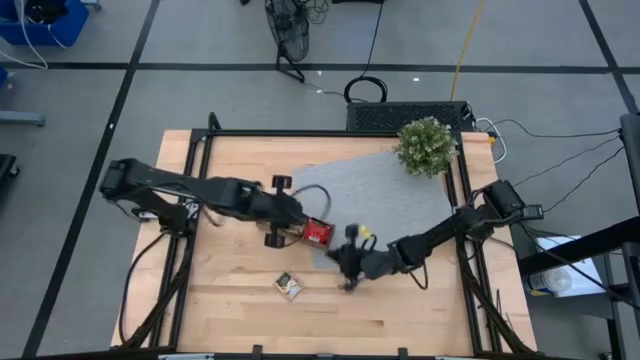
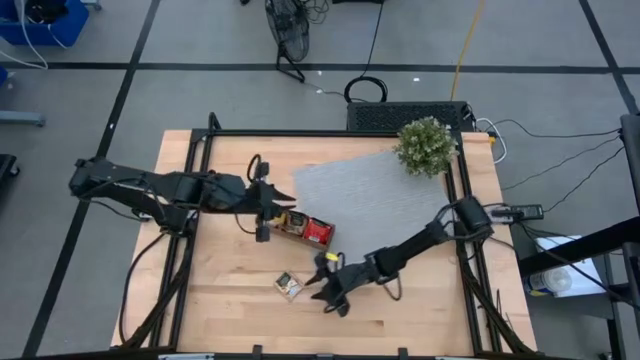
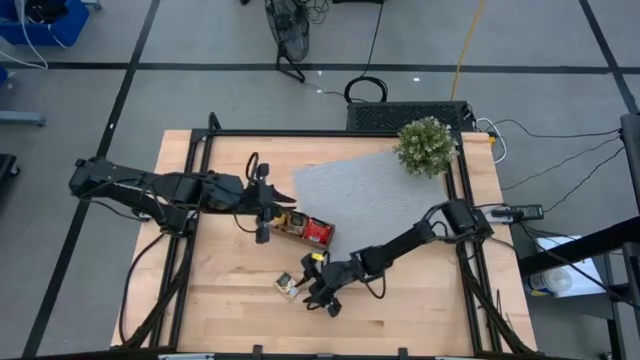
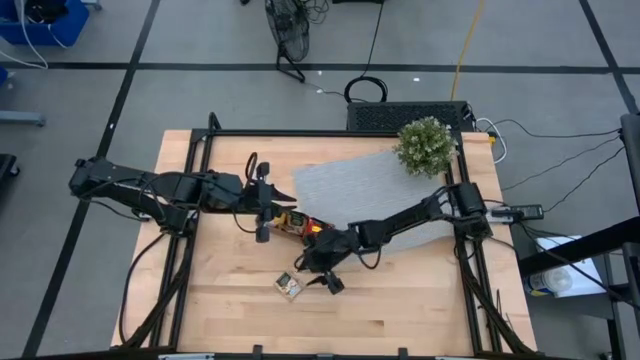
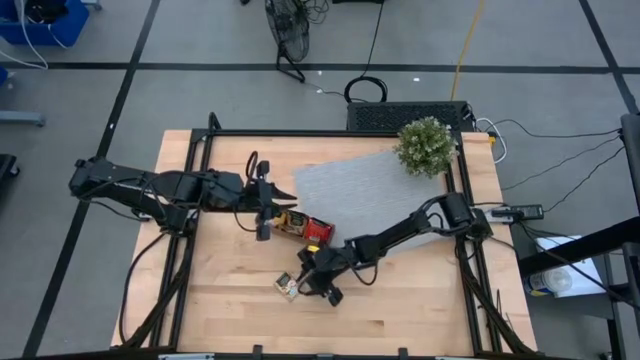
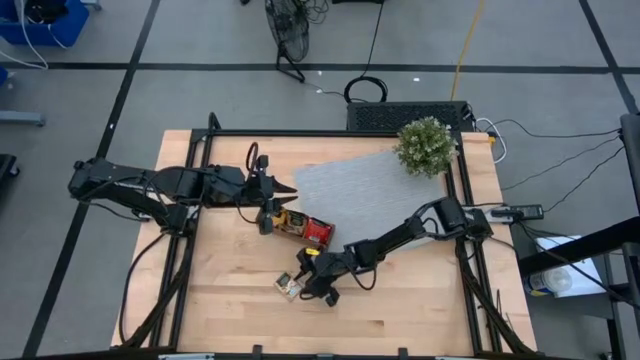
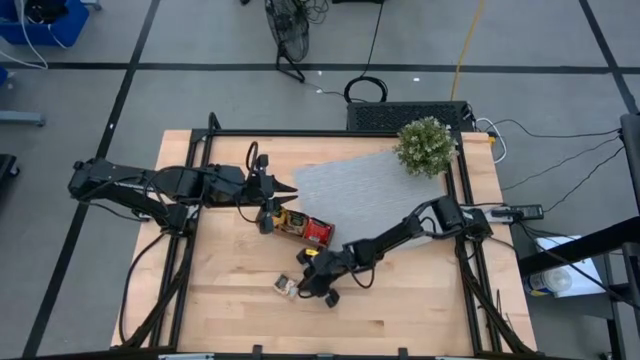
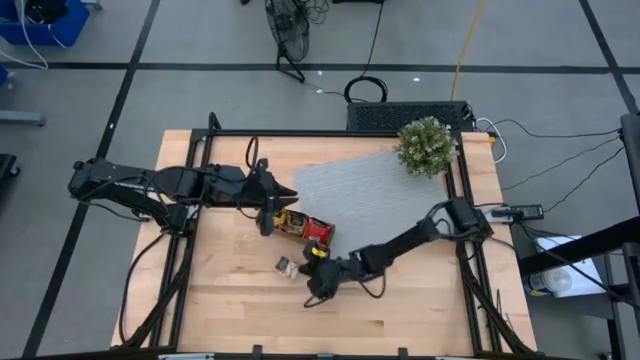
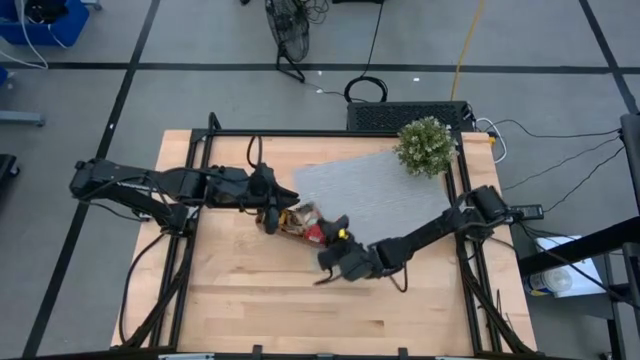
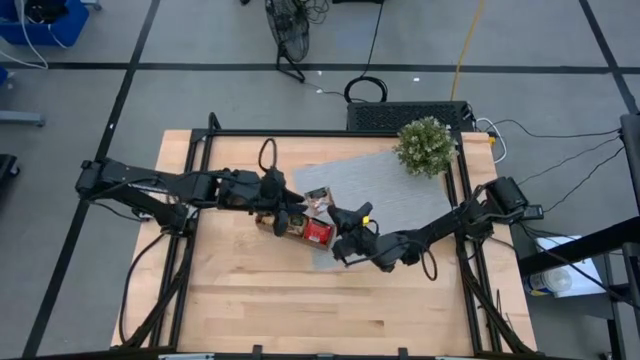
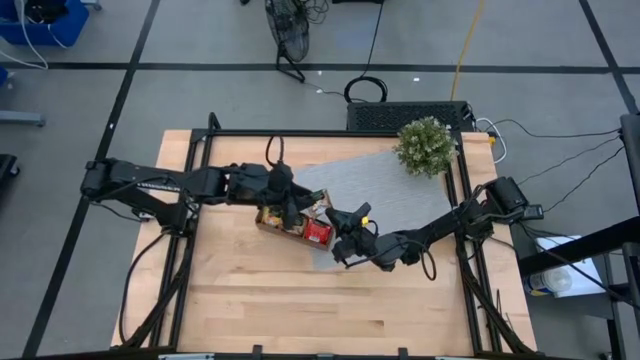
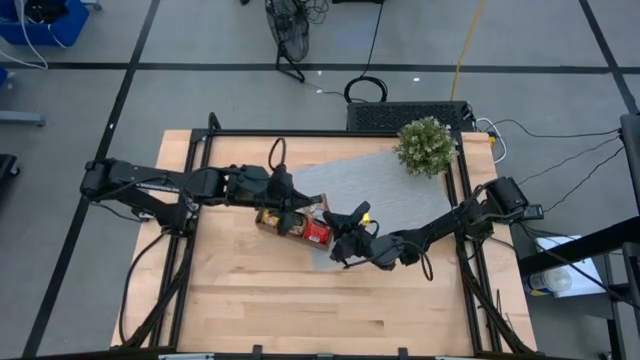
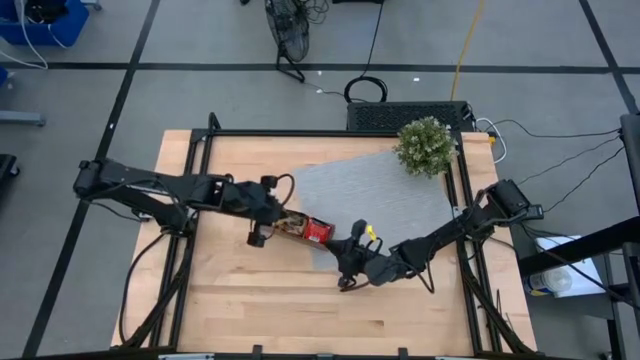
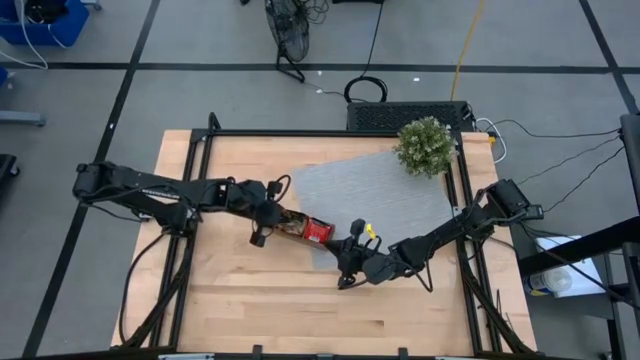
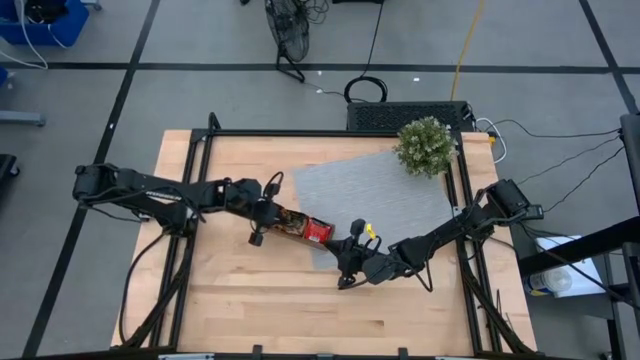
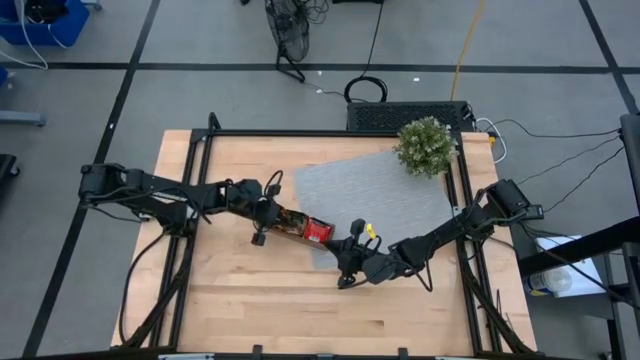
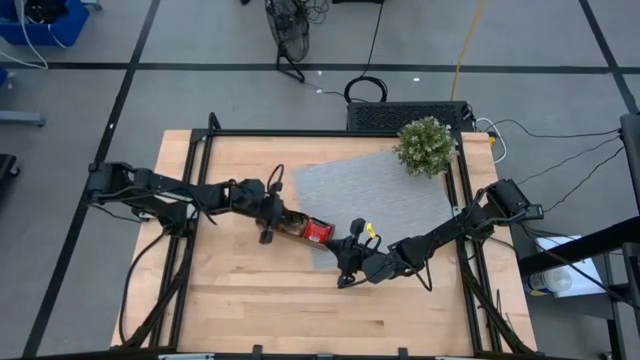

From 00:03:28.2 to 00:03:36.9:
Task: Pick & Place Tea
Put the brown tea bag into the middle section of the wooden organizer

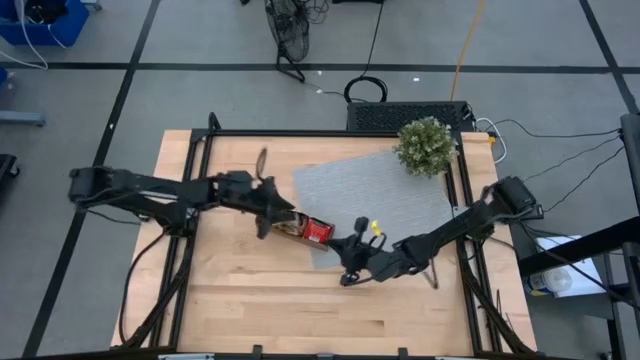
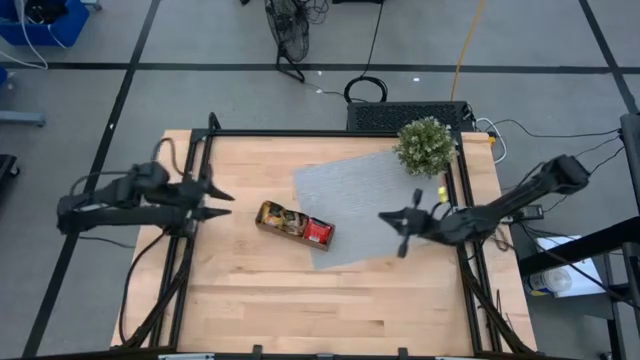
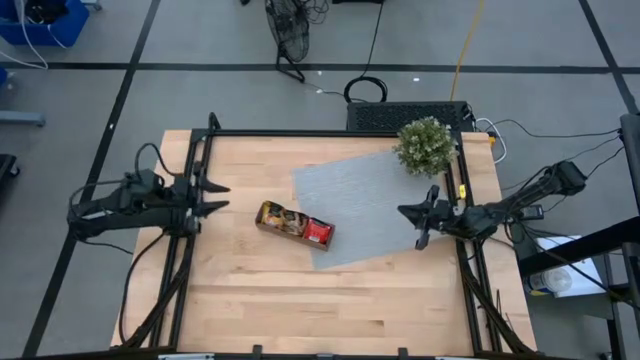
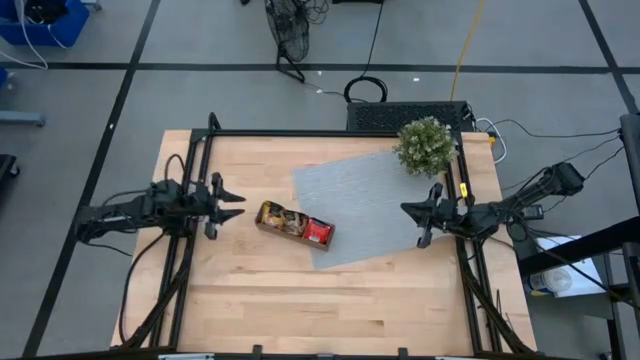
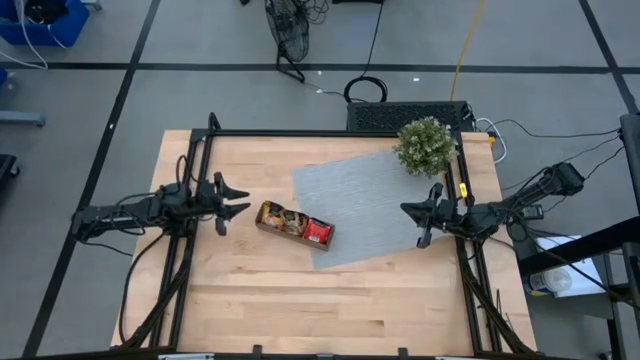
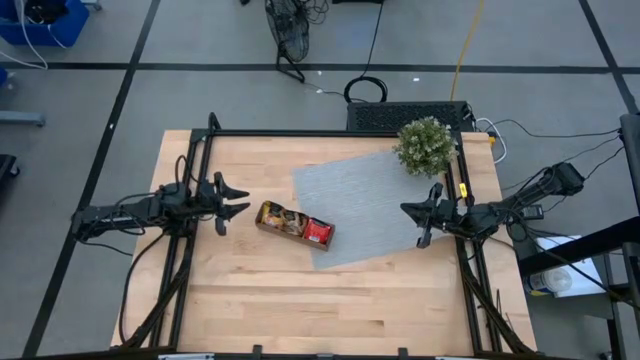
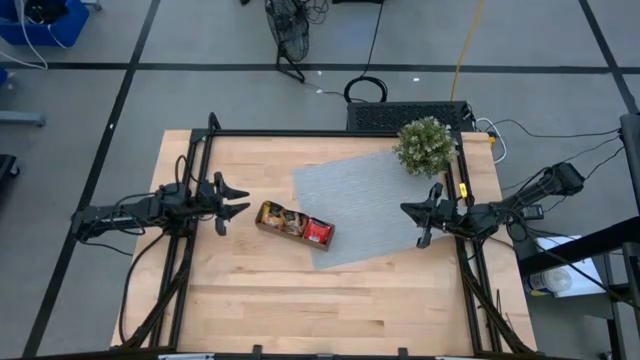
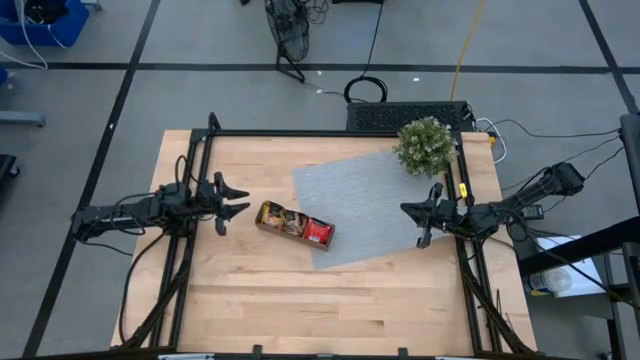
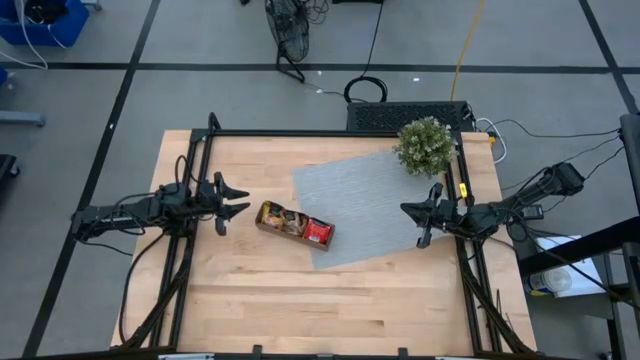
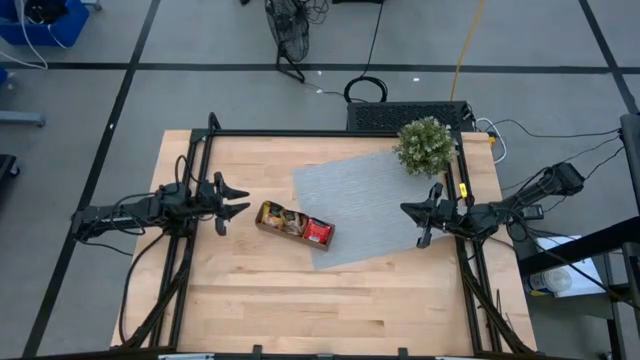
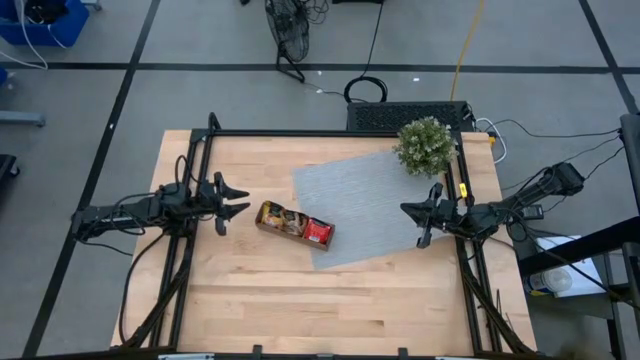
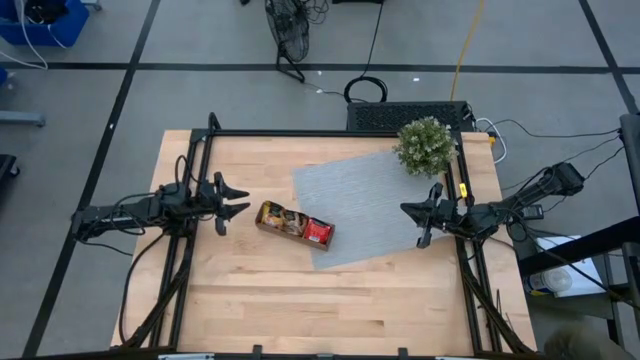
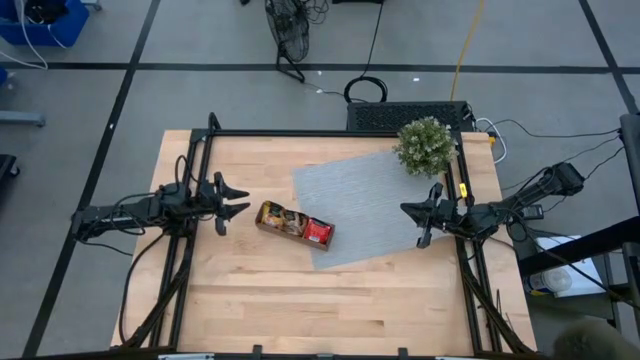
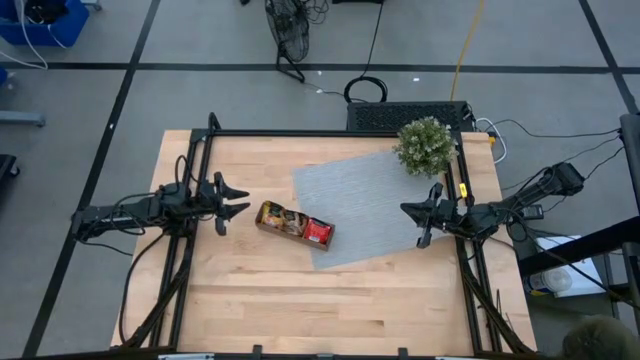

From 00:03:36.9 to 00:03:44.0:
Return to Home Position

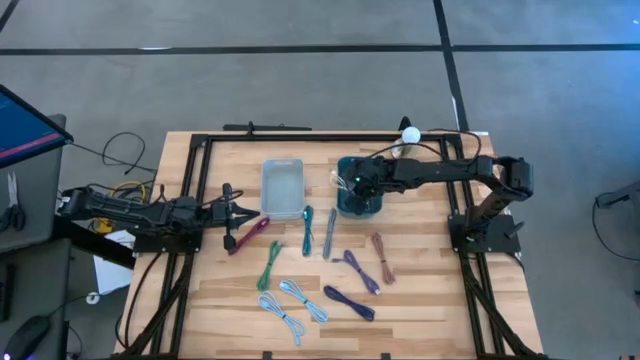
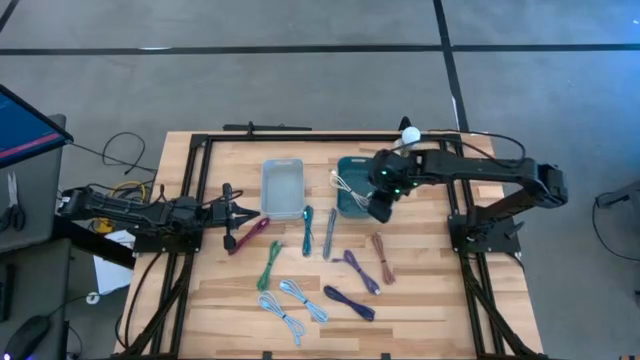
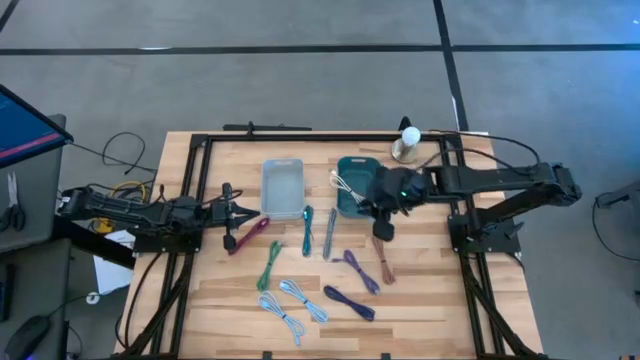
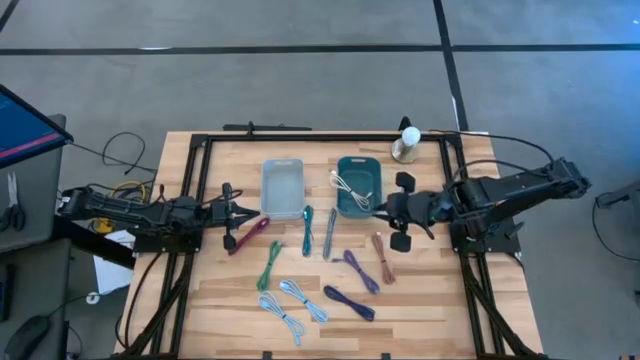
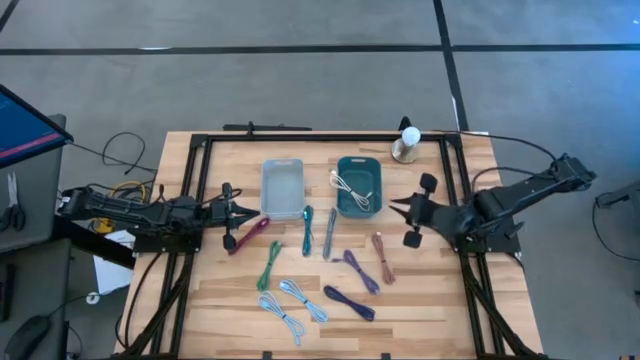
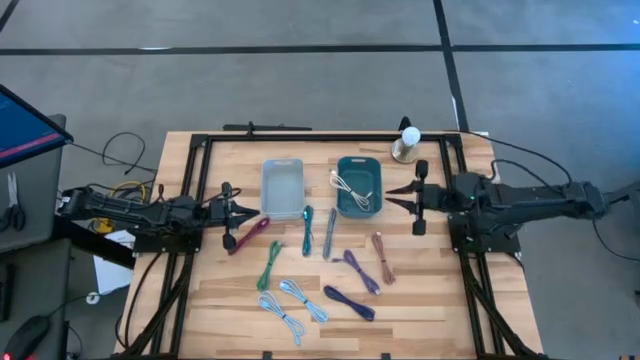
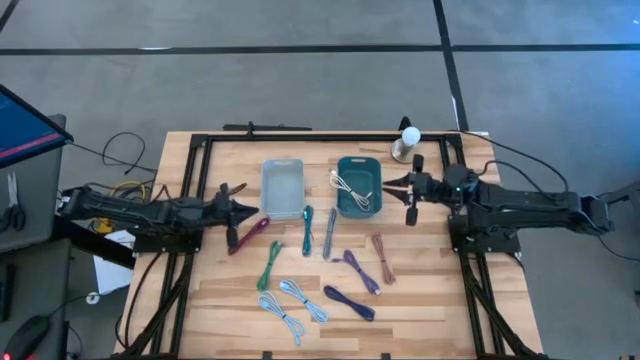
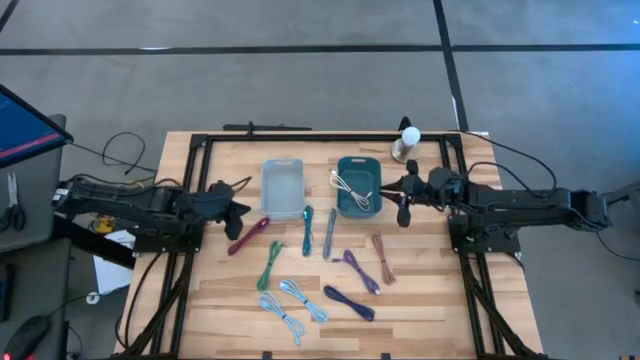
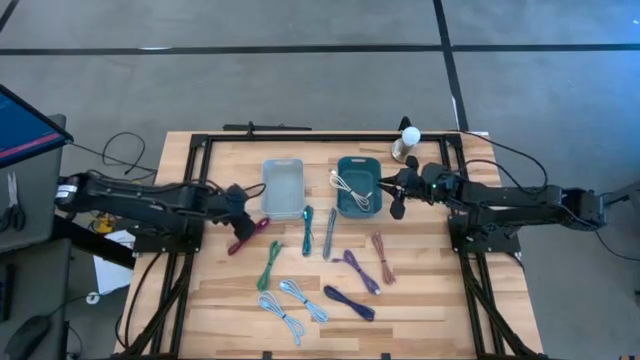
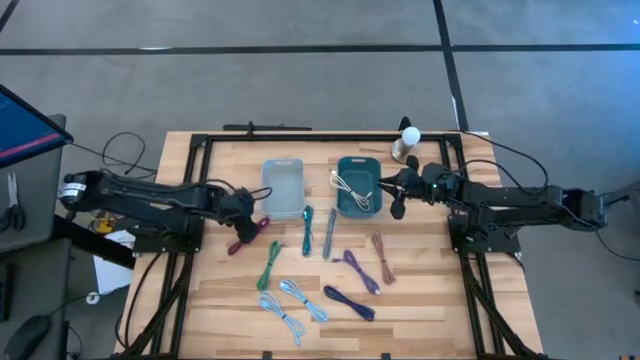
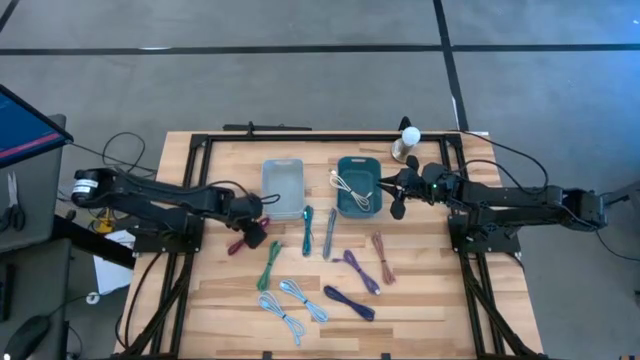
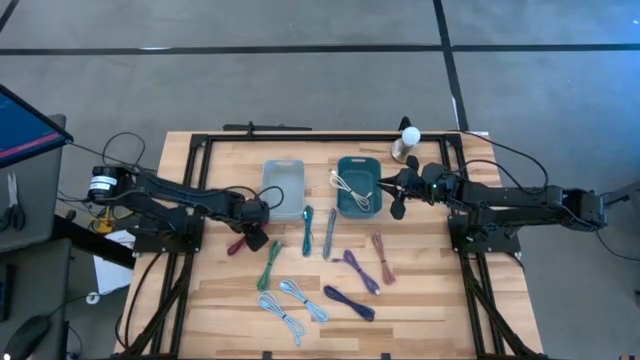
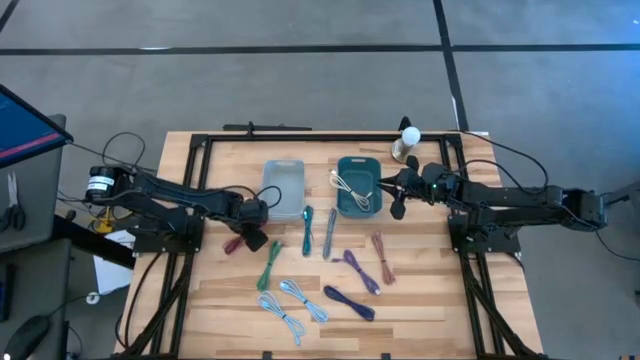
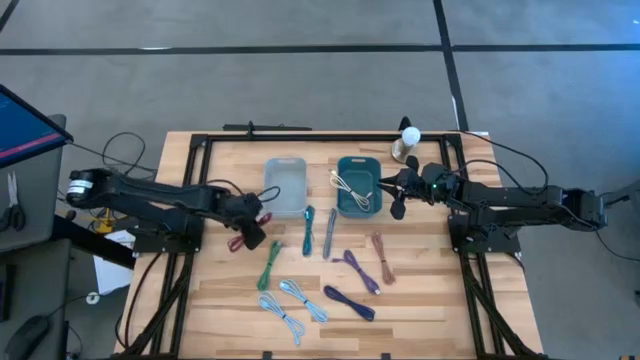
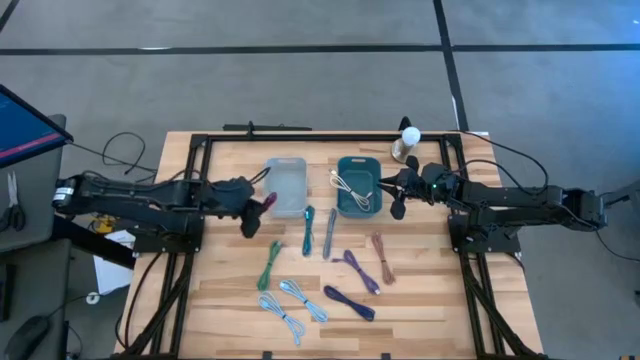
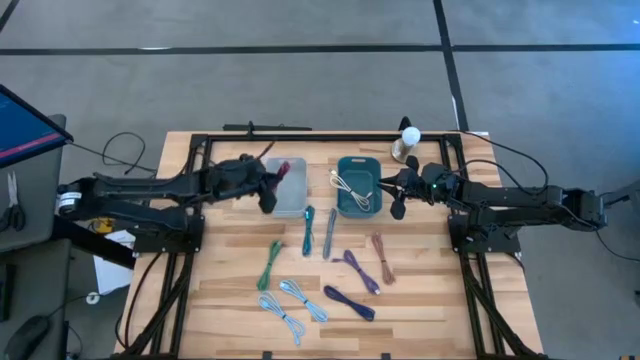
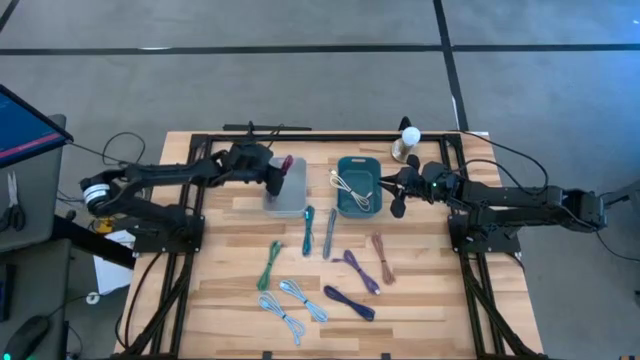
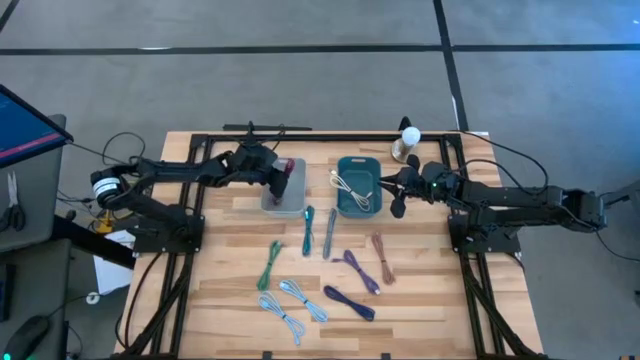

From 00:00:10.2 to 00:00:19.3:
Task: Pick & Place USB Port
Put the pink patterned charger cable into the white bin
